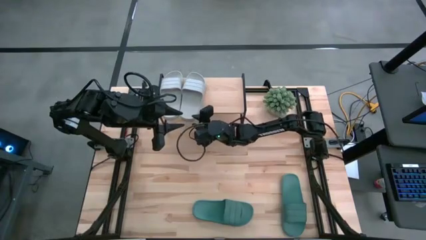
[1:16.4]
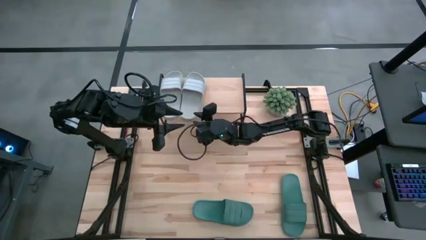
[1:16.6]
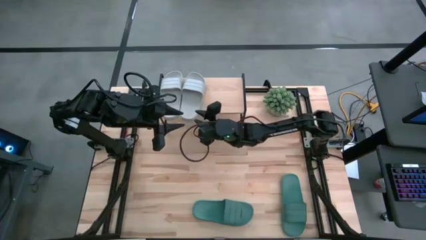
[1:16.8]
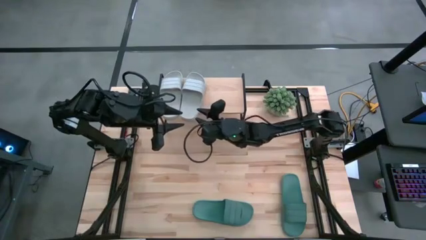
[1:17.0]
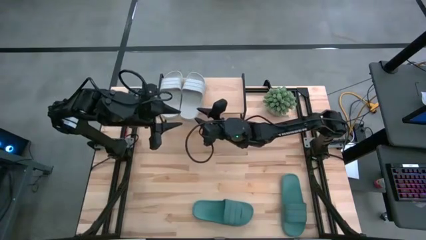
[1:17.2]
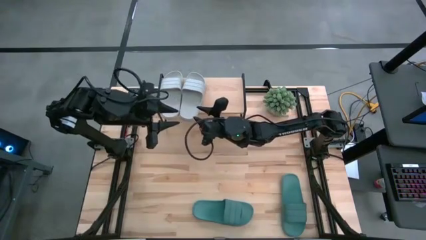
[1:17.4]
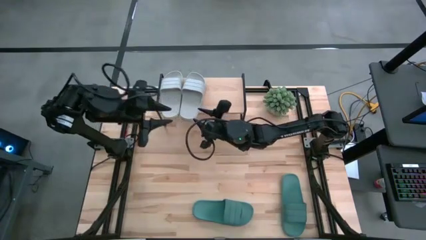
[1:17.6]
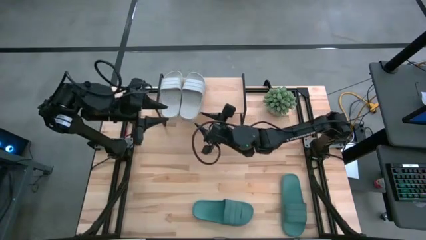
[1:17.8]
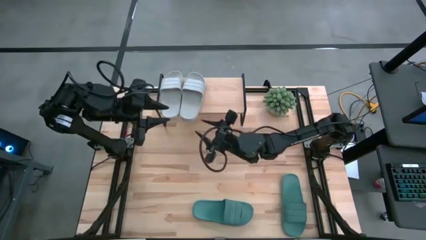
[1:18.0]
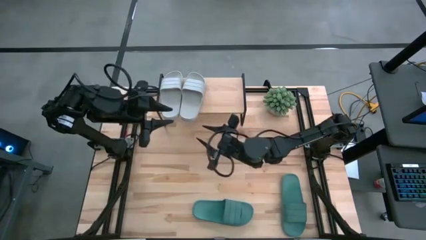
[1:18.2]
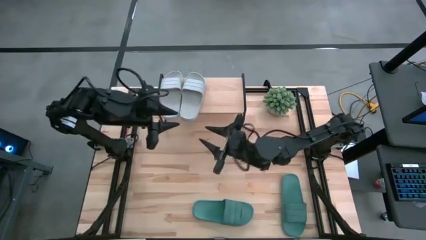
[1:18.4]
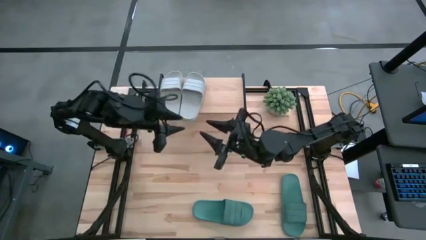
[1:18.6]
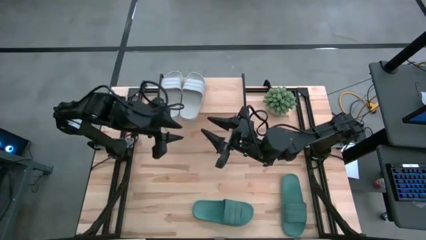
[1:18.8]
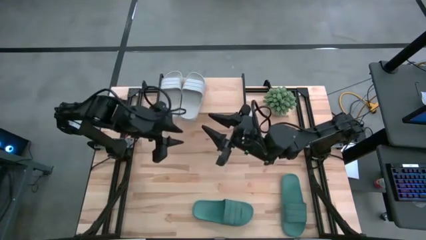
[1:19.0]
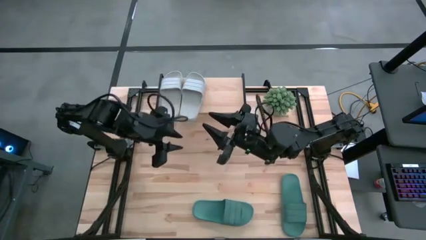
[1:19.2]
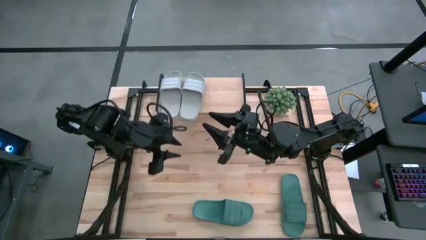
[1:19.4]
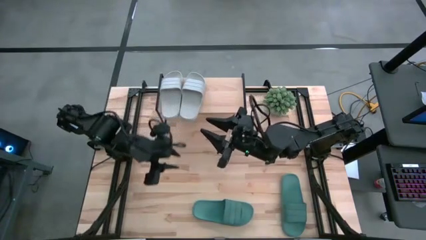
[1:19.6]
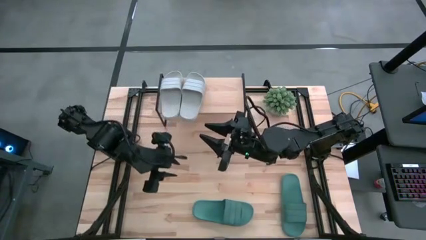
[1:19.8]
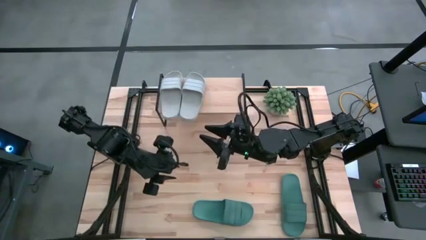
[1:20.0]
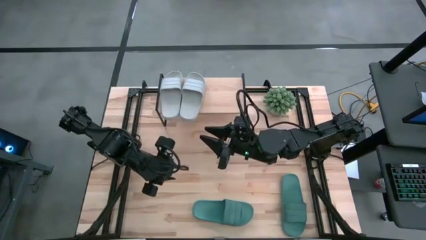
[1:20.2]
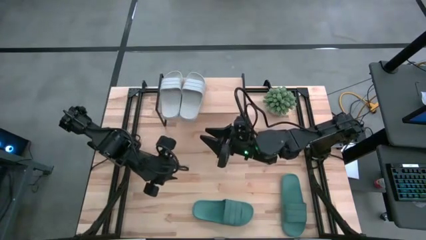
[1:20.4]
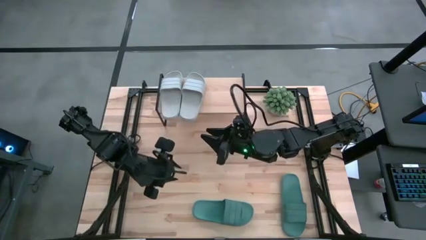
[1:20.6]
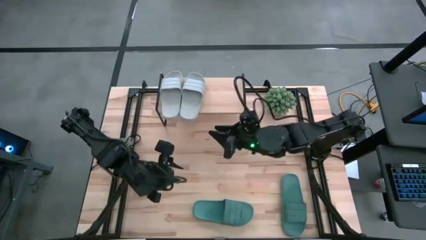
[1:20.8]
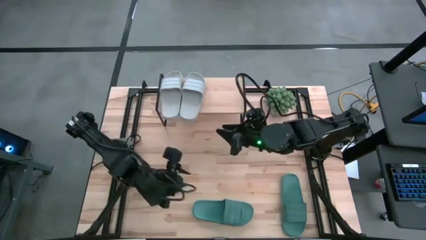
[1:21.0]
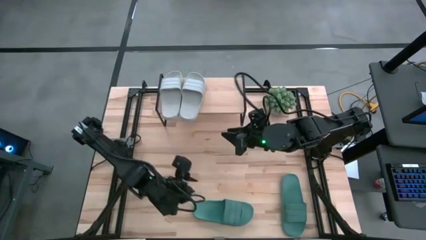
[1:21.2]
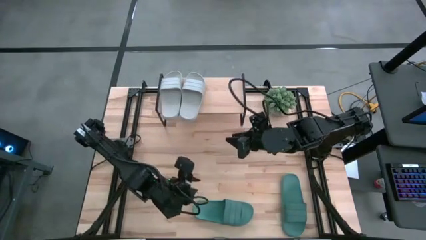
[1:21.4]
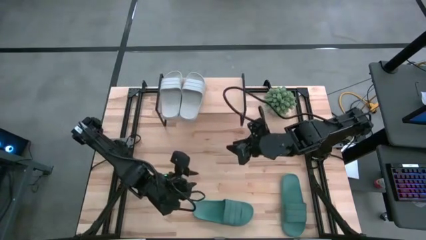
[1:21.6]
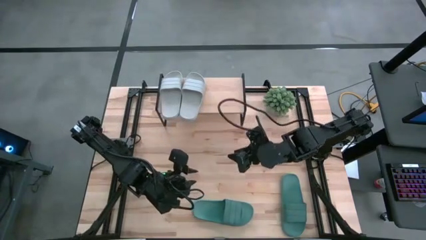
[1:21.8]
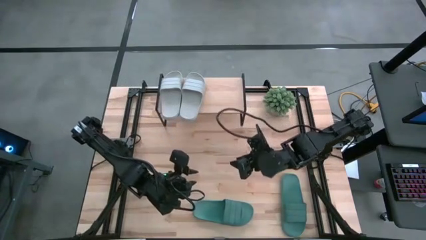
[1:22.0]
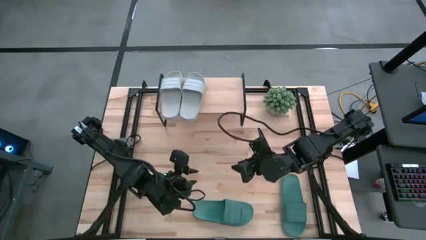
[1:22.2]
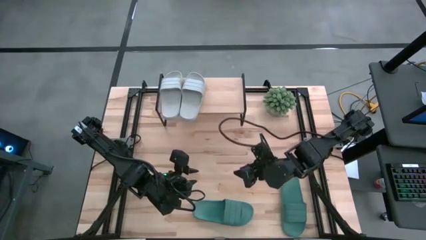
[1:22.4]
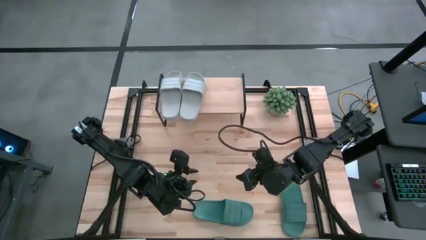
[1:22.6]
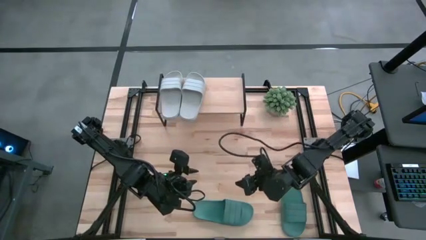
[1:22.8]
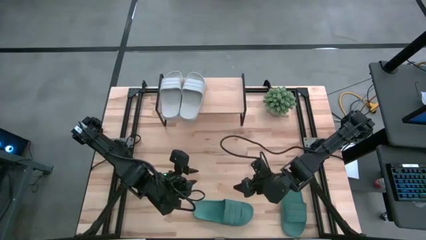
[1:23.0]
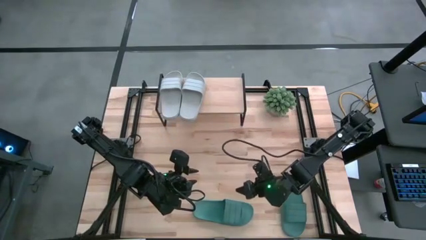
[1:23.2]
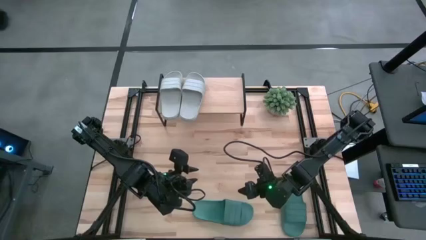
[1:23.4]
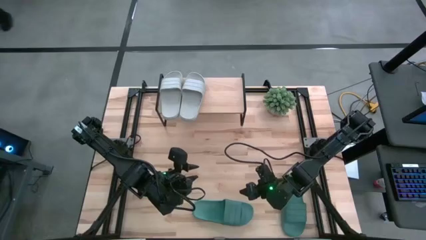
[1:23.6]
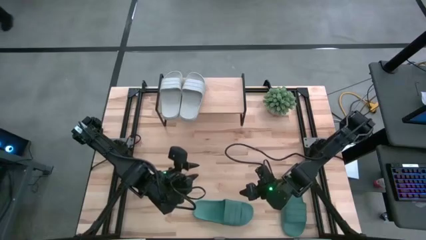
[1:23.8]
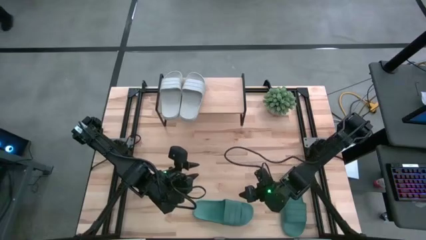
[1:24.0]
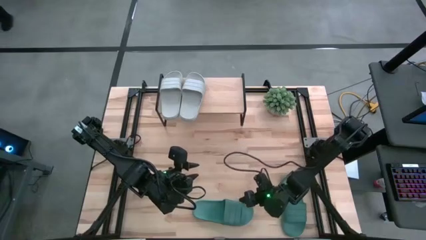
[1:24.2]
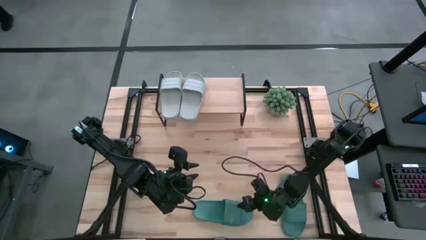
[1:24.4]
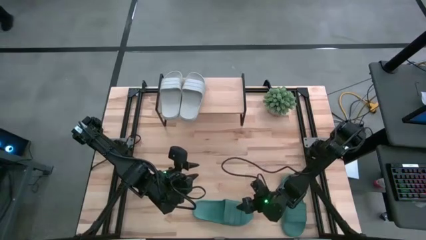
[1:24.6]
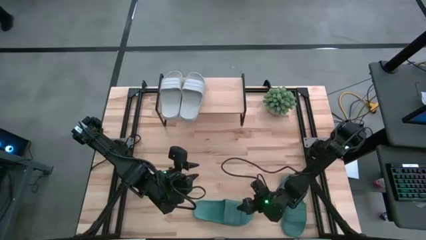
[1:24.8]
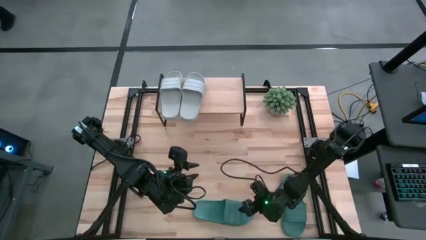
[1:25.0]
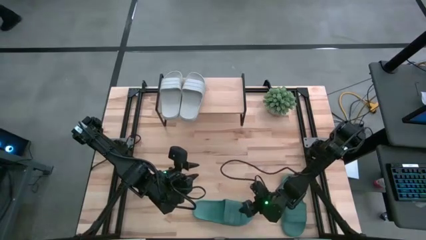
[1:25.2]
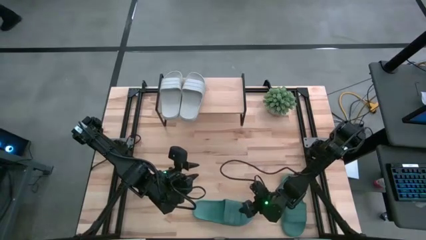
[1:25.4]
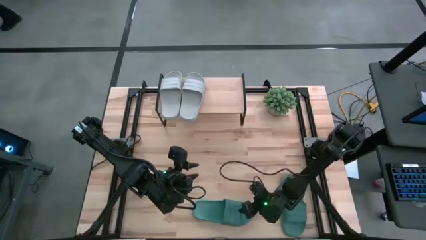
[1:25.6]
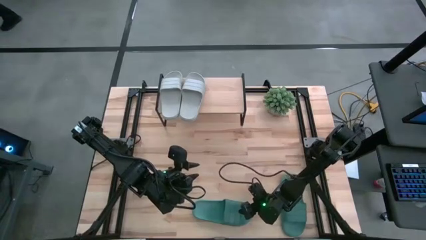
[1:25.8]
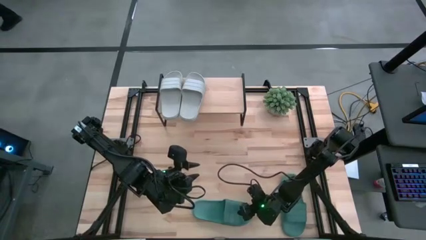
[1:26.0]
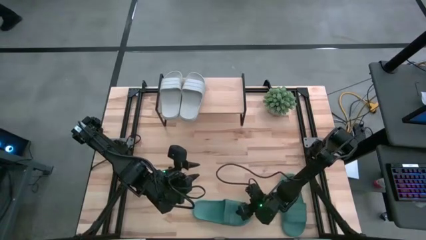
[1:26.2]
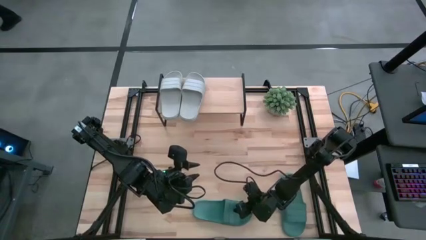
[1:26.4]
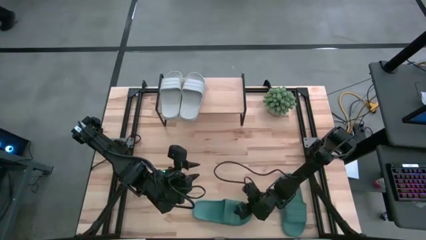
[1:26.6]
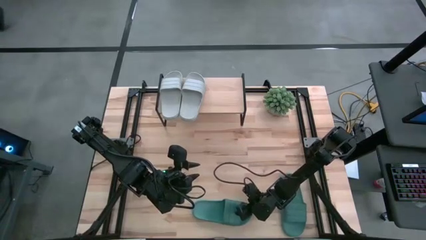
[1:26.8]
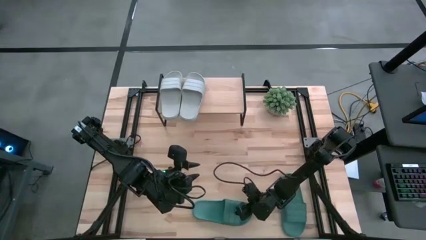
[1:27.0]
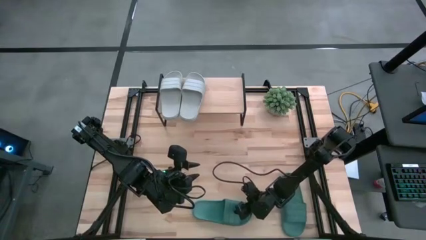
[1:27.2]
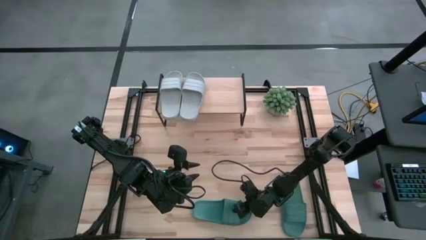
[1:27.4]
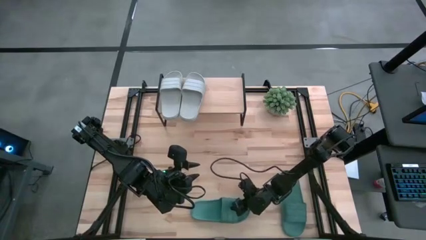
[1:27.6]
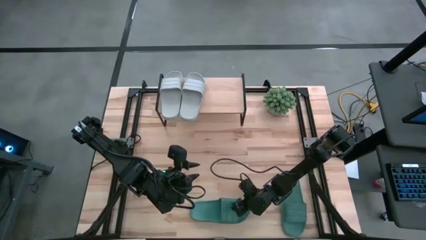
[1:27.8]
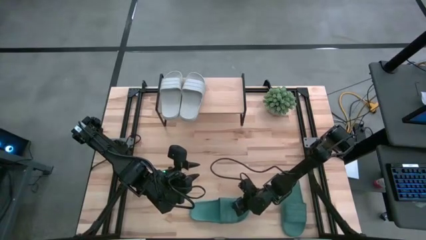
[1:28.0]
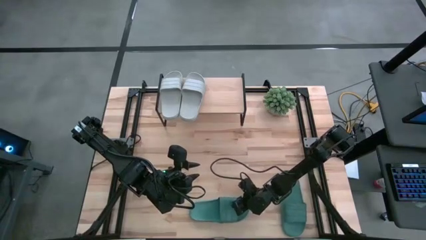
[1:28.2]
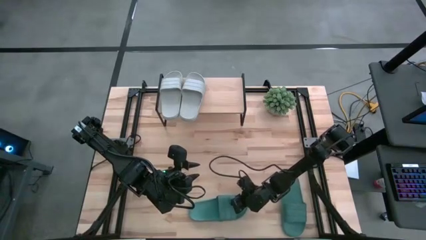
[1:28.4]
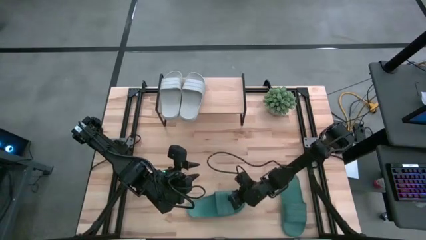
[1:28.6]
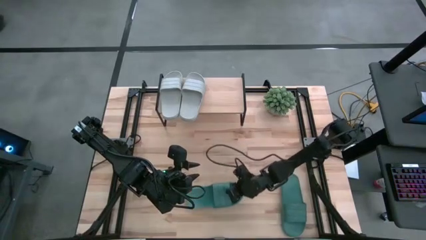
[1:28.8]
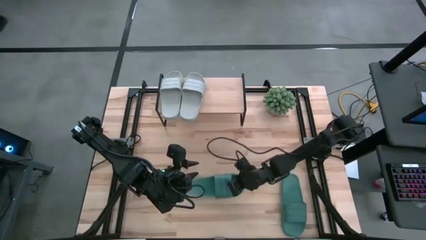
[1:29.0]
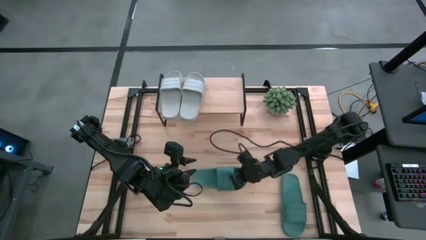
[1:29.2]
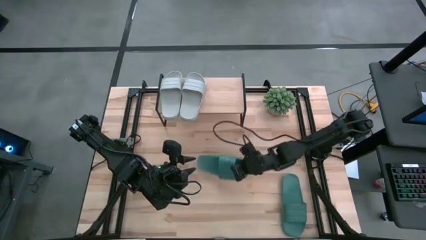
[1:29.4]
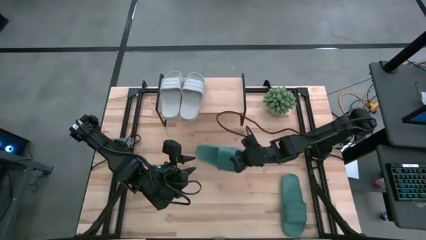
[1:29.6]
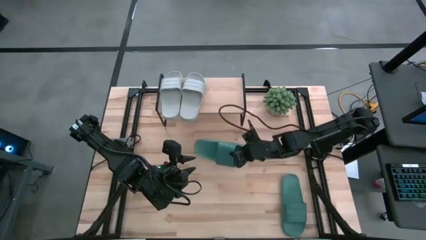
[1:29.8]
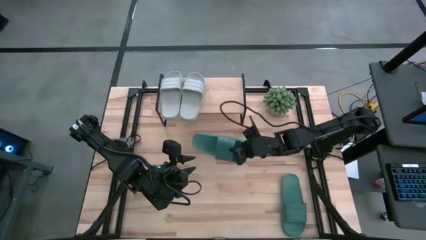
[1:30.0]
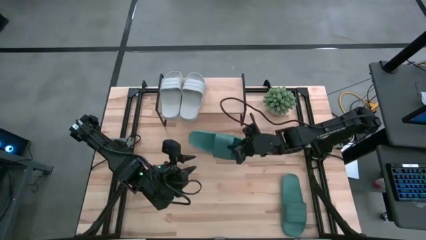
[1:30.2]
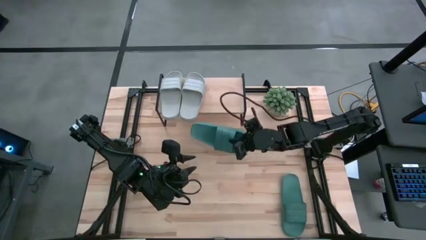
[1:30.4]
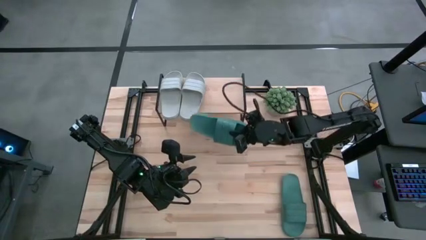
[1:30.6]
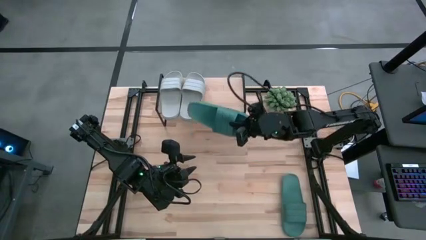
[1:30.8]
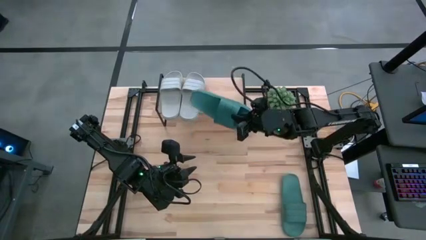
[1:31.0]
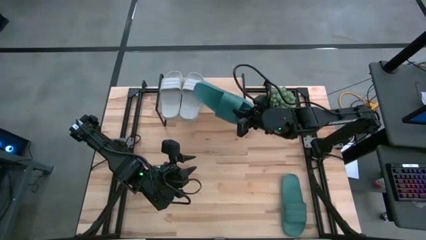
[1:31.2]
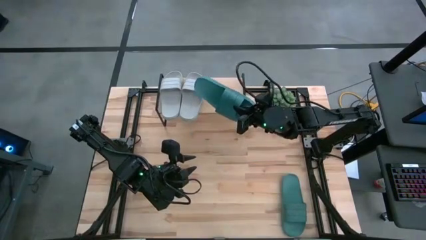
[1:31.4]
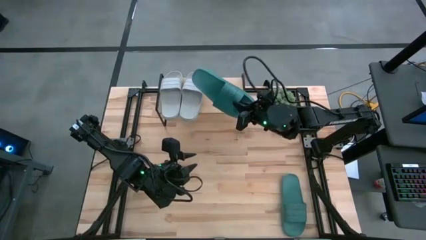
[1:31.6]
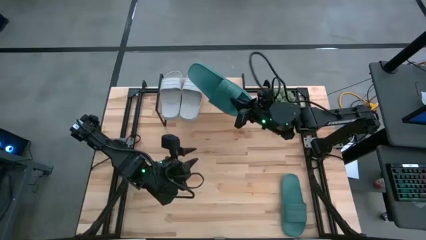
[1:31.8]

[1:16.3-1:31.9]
Task: Pick and place slides into the shelf
Put the left green slipper on the shelf
